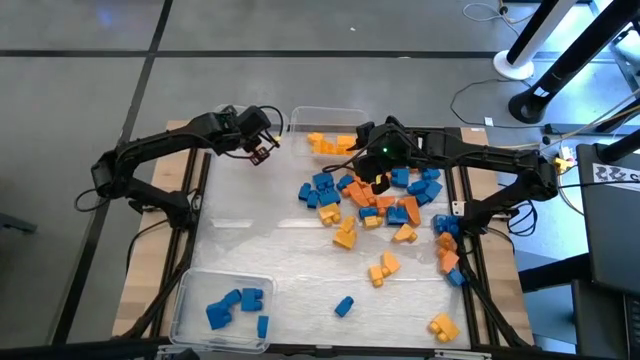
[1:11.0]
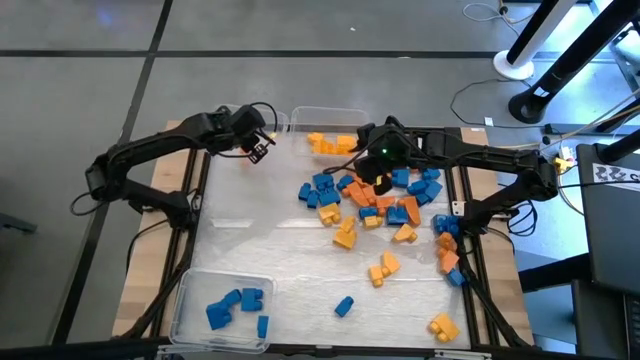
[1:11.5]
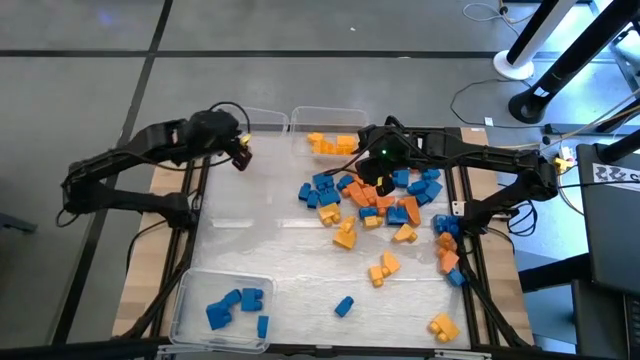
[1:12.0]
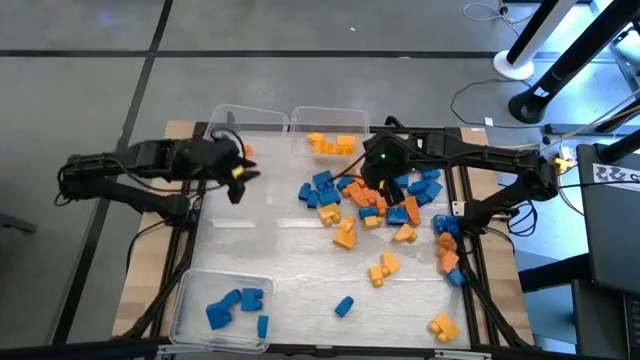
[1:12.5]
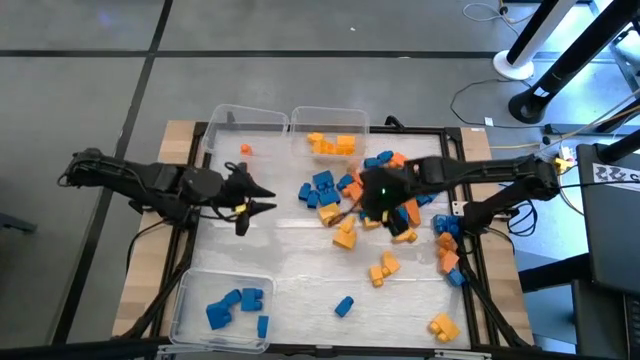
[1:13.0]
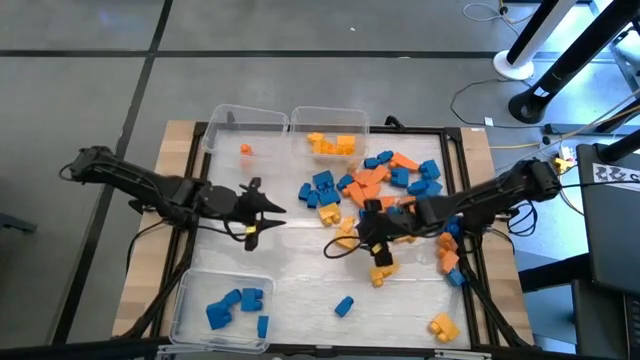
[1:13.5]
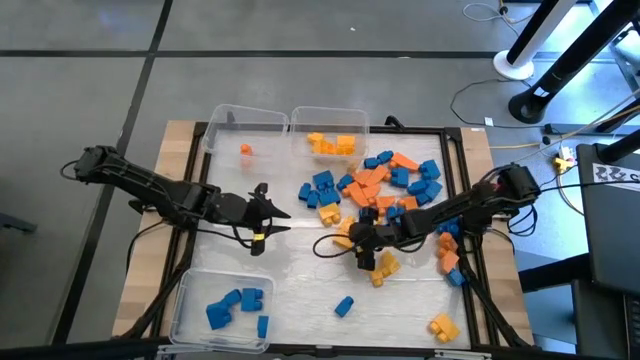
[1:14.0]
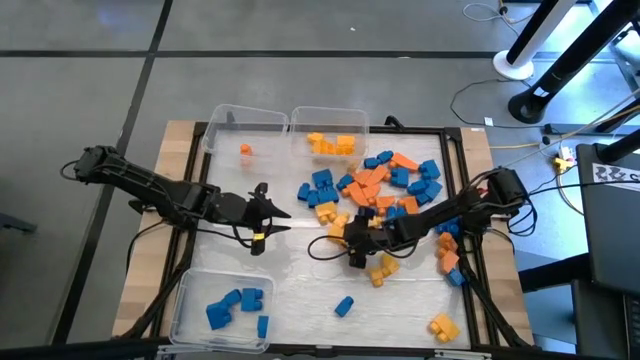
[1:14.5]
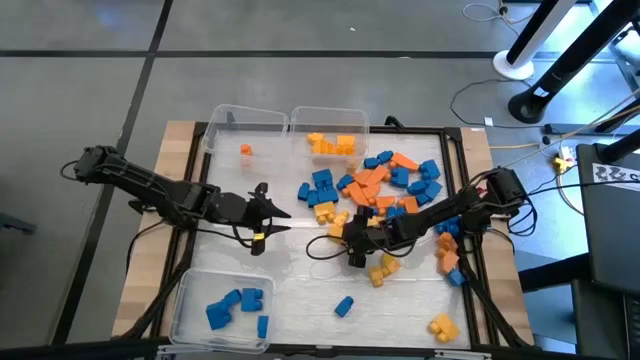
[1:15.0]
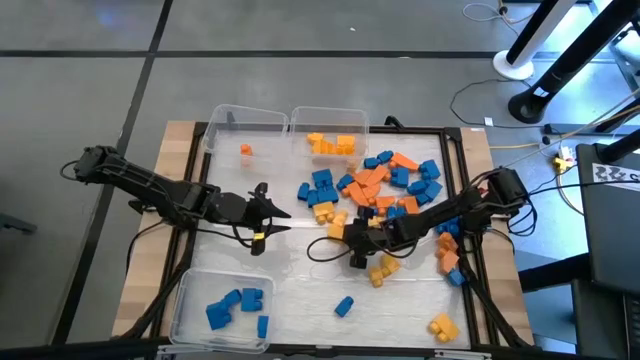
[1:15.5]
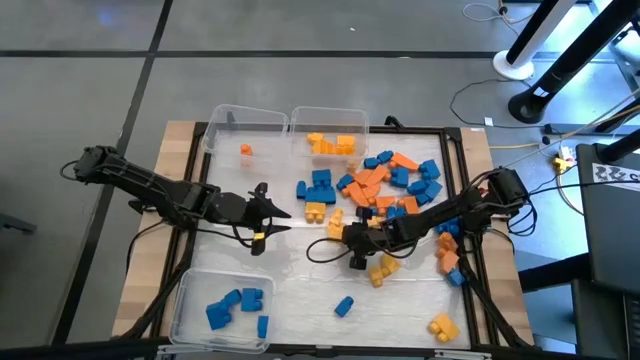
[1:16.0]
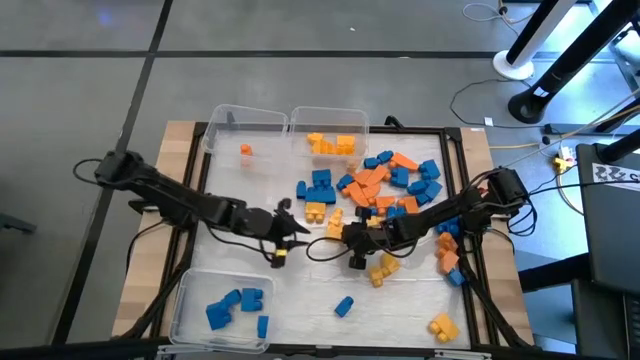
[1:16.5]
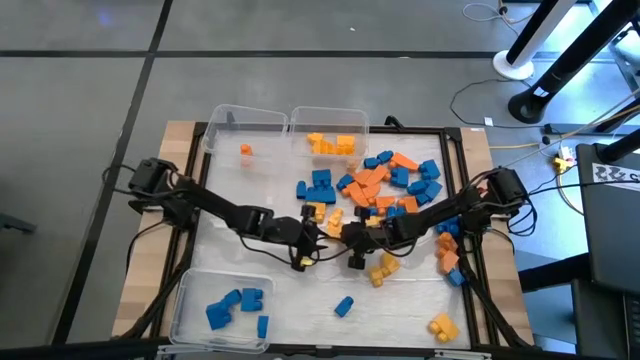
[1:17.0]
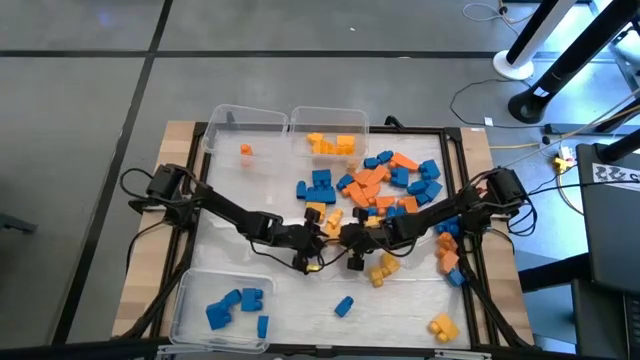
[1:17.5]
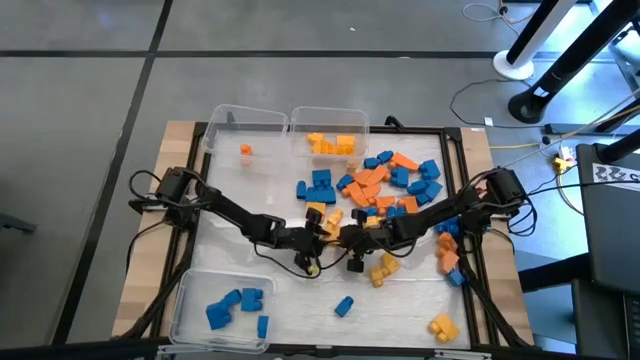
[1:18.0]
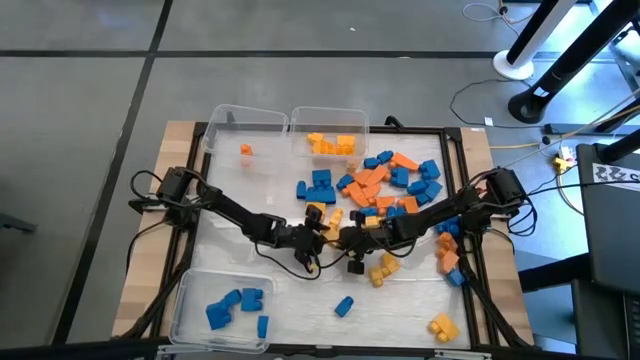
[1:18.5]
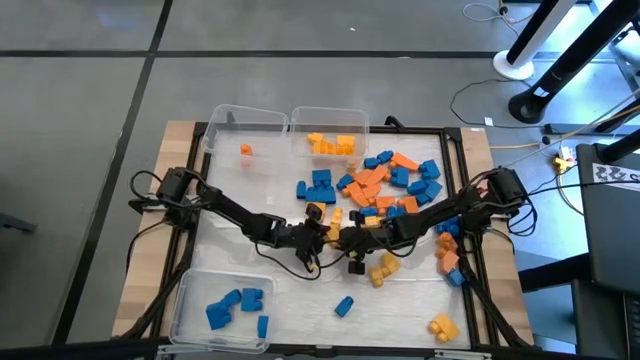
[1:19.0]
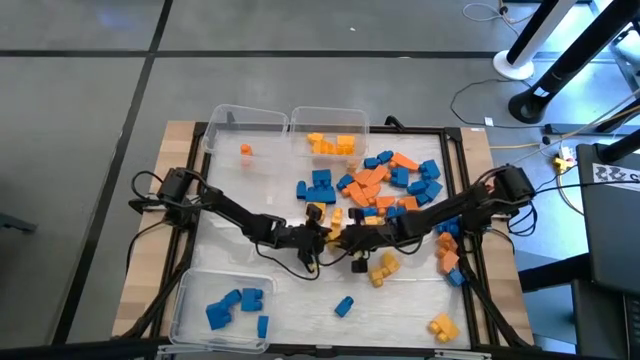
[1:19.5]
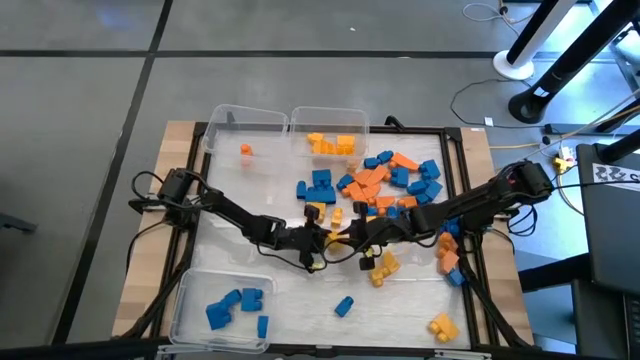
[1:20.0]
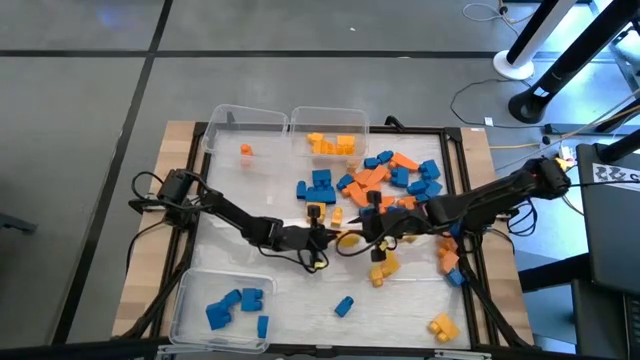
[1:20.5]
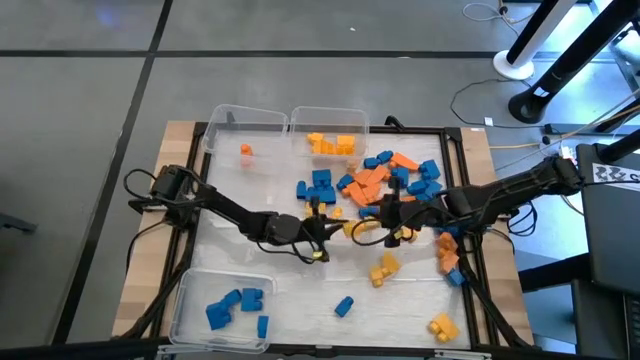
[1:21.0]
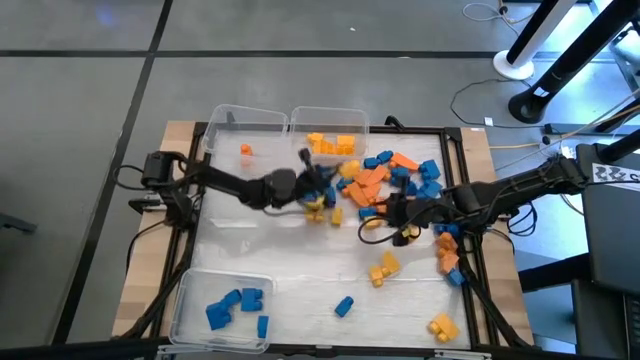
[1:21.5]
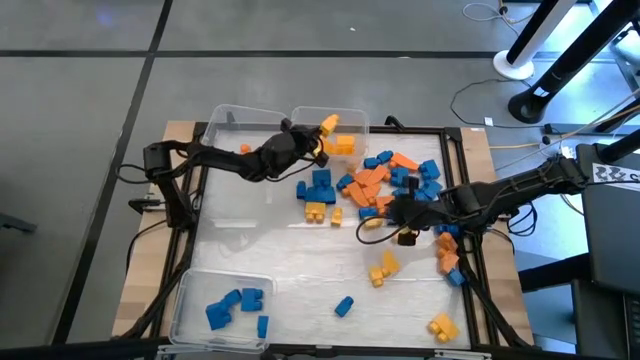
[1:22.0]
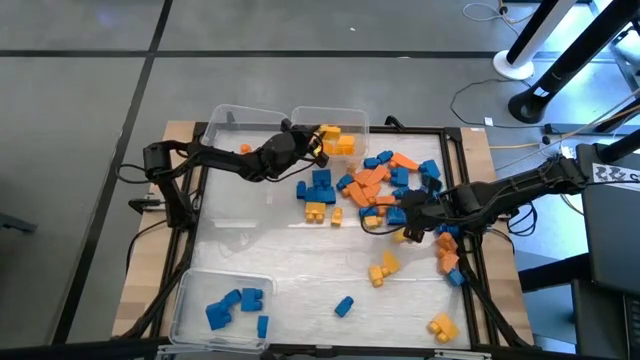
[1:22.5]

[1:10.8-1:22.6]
Task: Sort blocks
Put the yellow game piece into the top right transparent bin

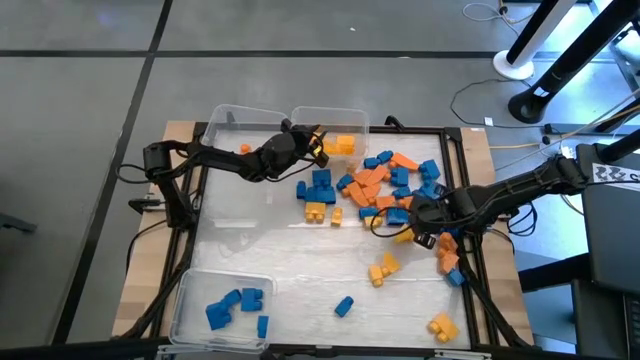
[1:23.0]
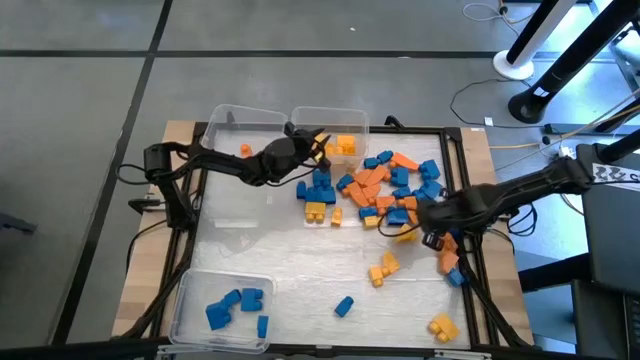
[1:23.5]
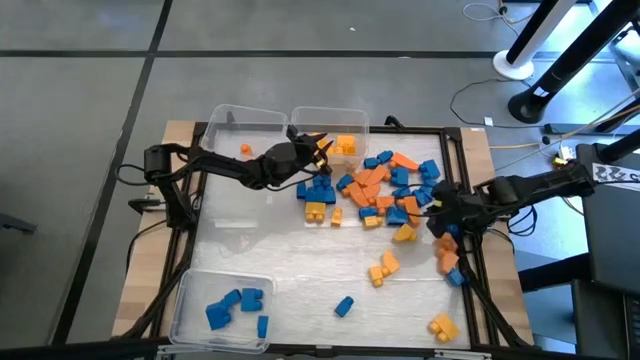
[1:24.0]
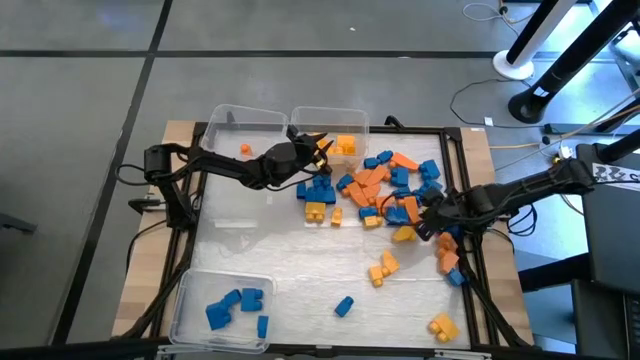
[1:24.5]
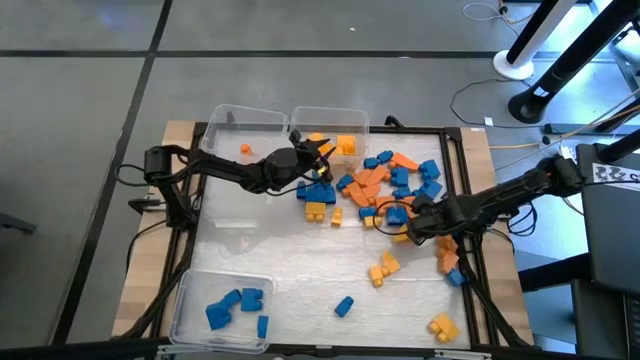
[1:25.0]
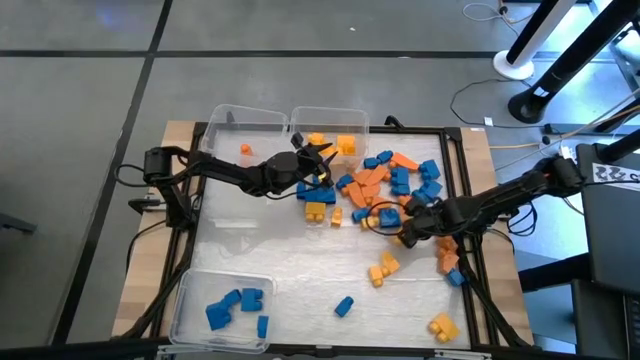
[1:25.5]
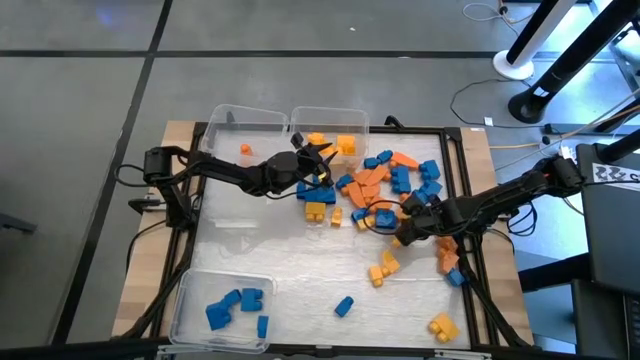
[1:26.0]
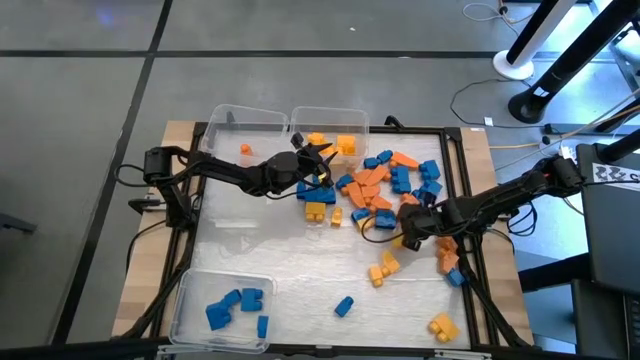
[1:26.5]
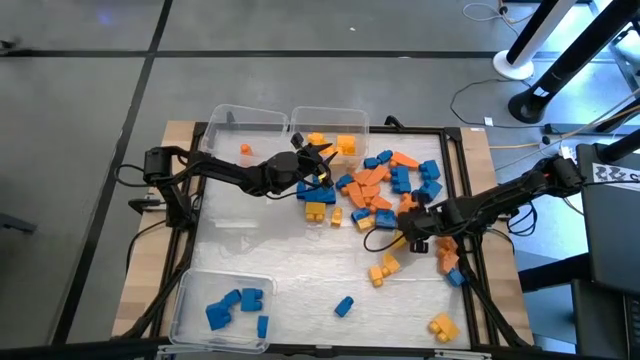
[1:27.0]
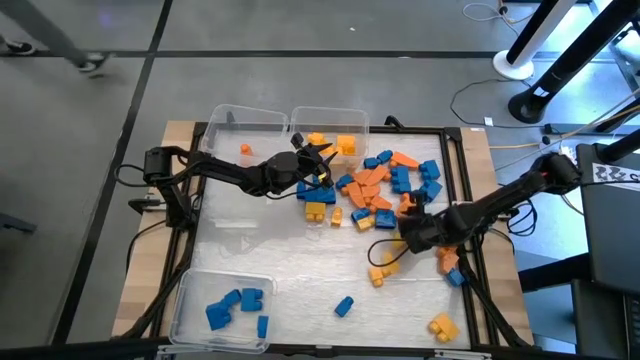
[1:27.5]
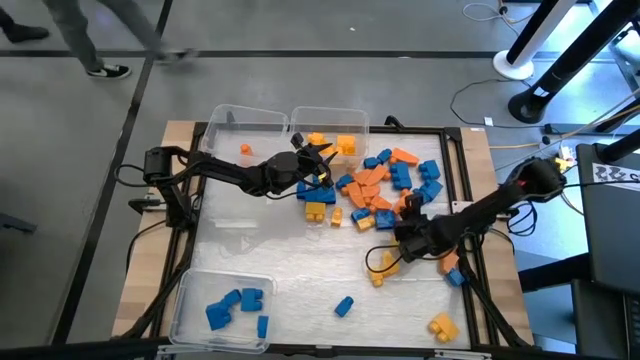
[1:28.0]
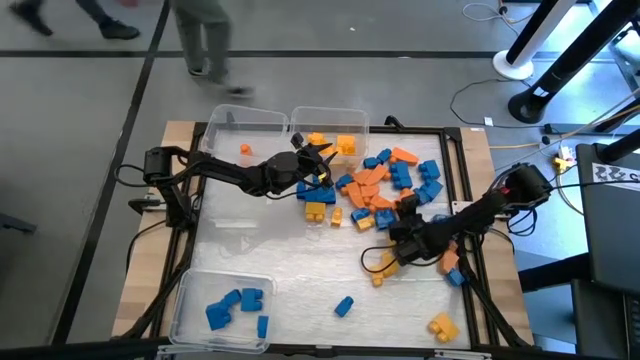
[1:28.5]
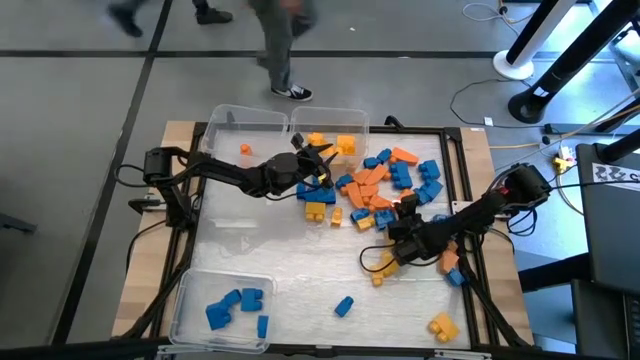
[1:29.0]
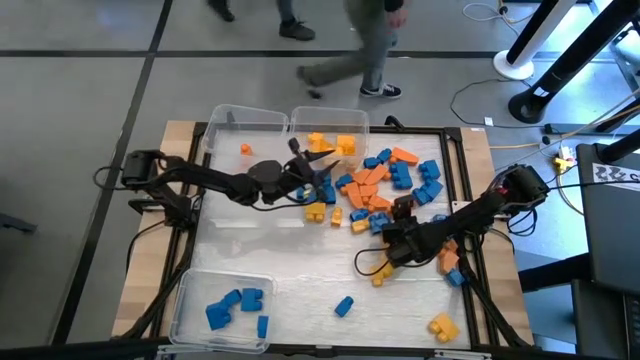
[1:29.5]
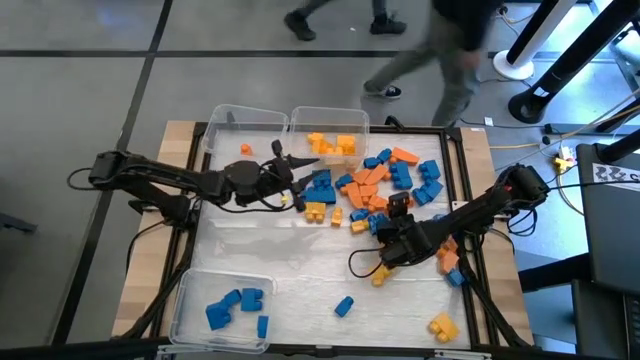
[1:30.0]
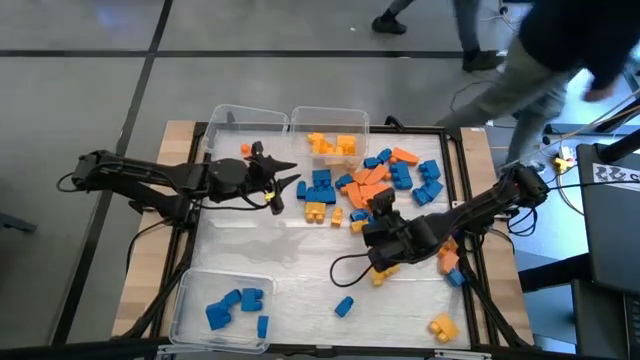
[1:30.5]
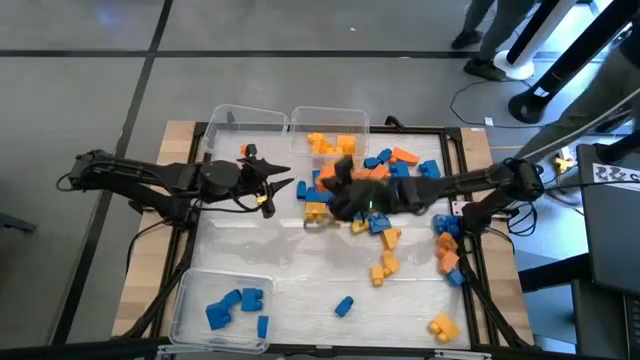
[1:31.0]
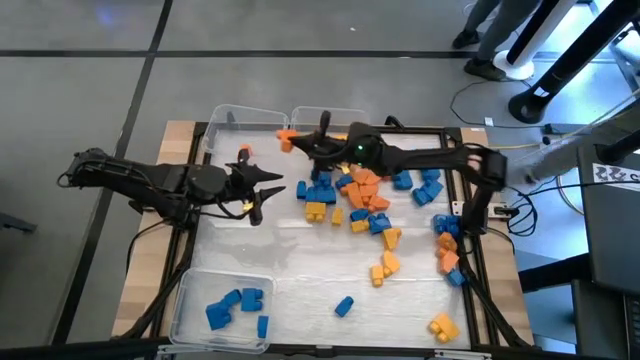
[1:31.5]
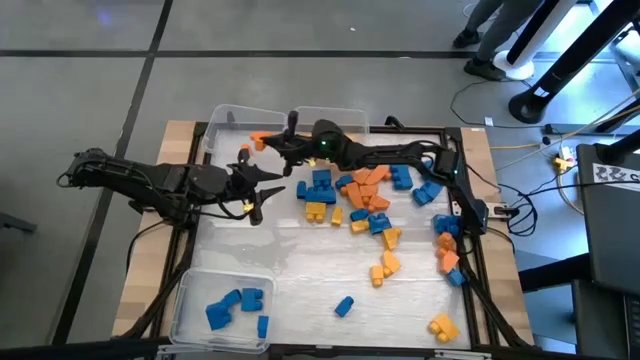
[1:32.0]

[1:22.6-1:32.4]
Put the orange game piece into the top left transparent bin
